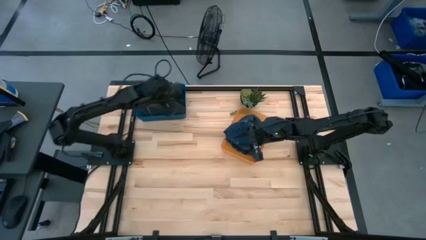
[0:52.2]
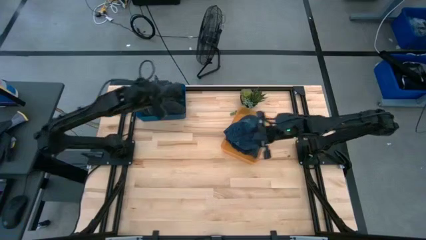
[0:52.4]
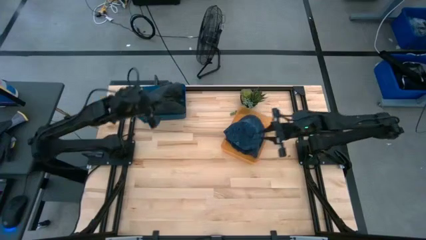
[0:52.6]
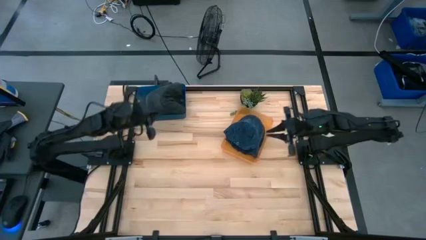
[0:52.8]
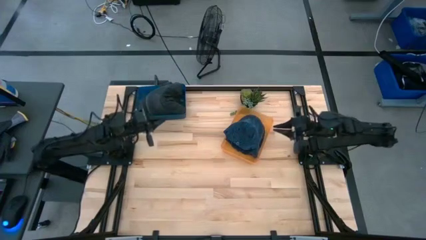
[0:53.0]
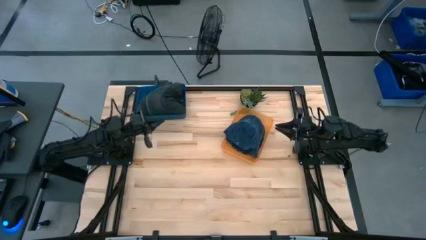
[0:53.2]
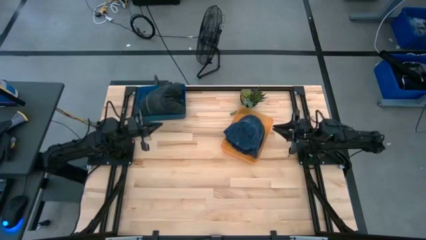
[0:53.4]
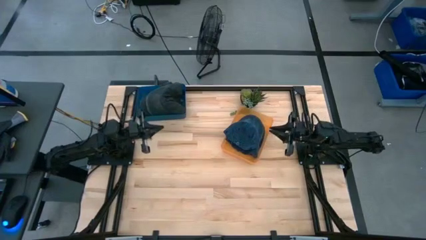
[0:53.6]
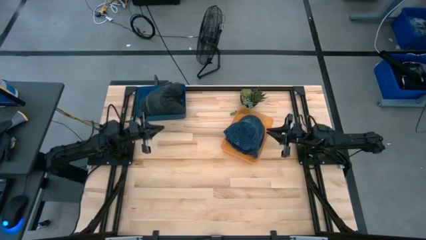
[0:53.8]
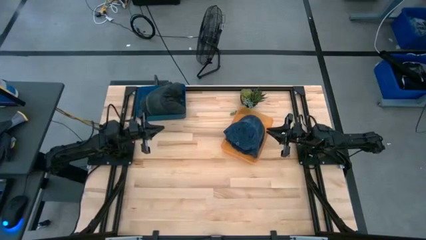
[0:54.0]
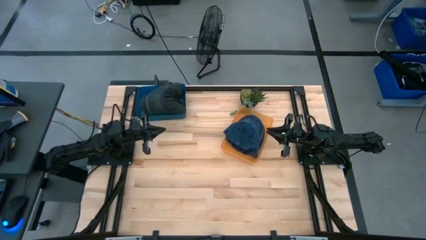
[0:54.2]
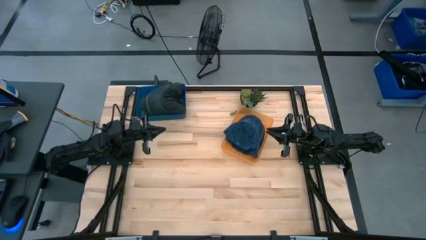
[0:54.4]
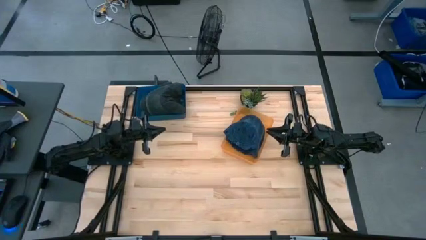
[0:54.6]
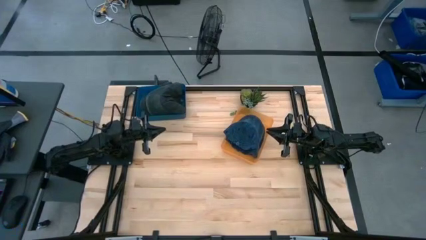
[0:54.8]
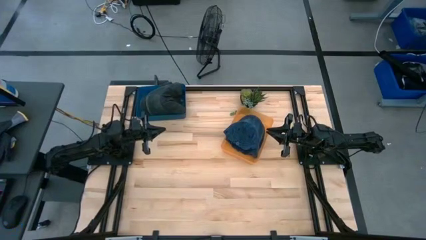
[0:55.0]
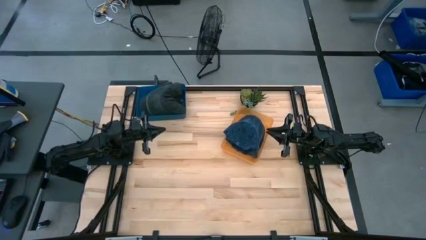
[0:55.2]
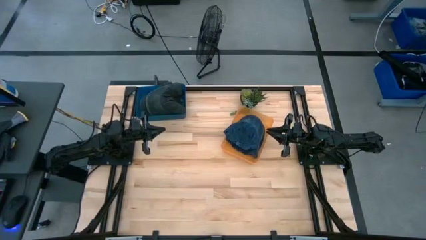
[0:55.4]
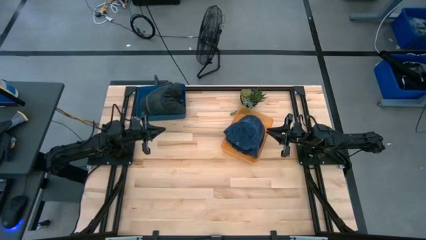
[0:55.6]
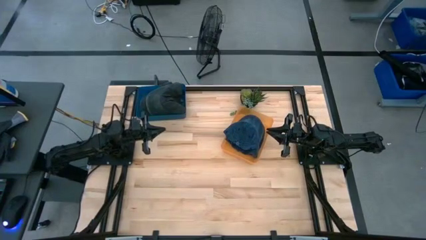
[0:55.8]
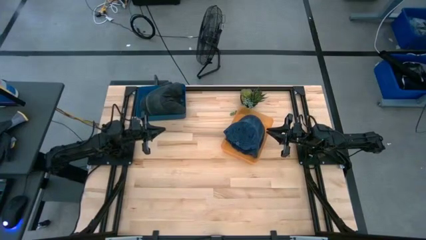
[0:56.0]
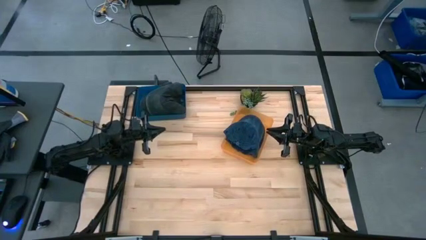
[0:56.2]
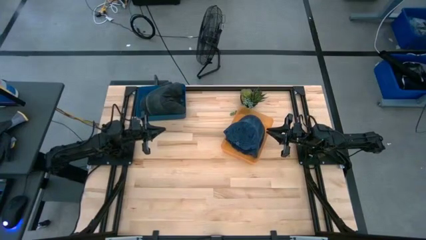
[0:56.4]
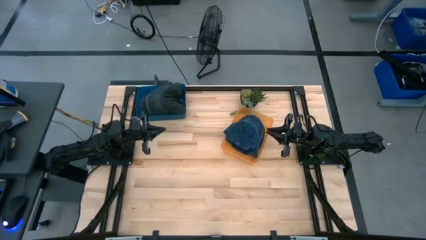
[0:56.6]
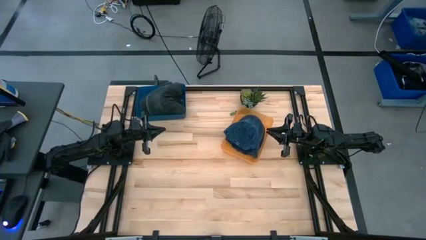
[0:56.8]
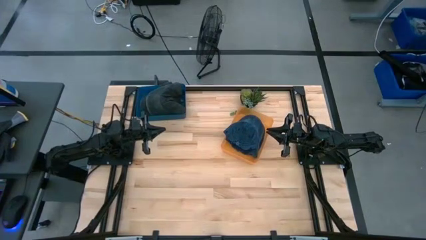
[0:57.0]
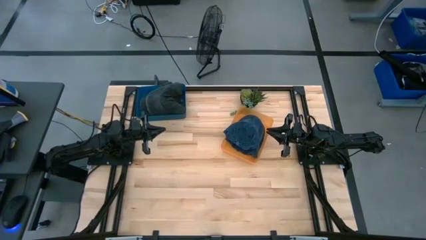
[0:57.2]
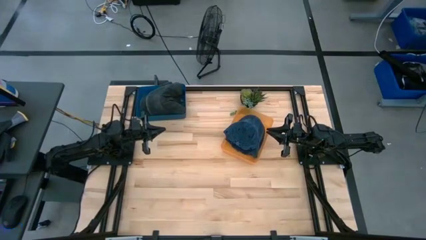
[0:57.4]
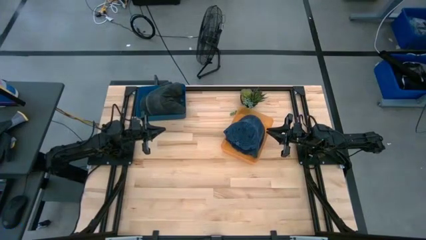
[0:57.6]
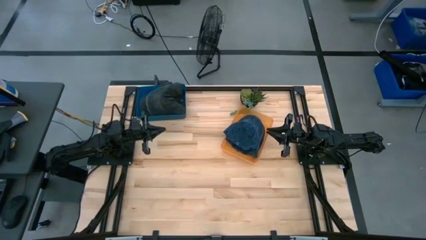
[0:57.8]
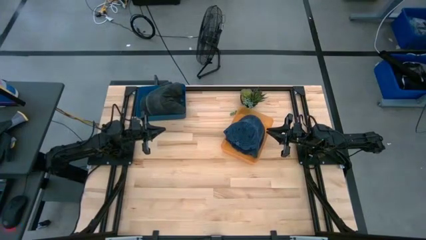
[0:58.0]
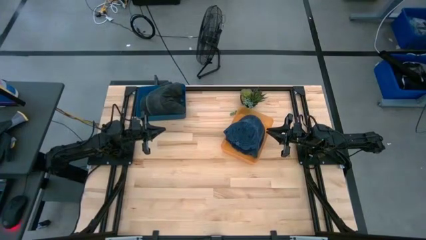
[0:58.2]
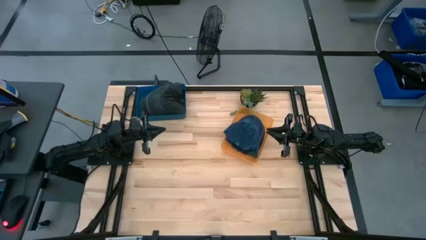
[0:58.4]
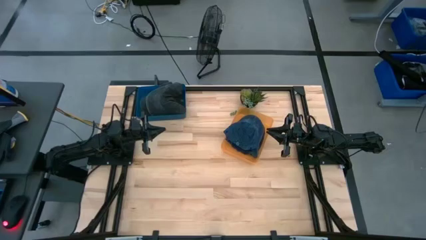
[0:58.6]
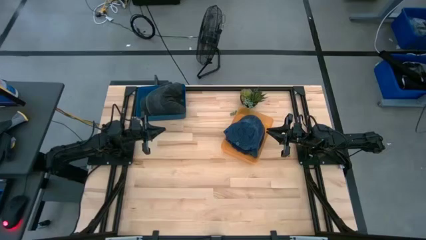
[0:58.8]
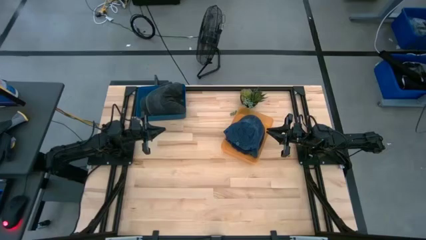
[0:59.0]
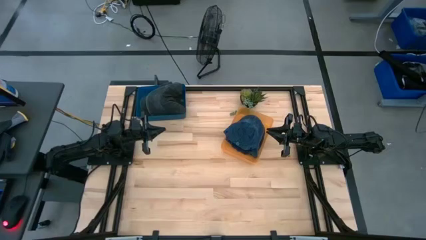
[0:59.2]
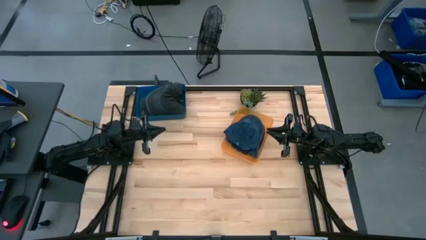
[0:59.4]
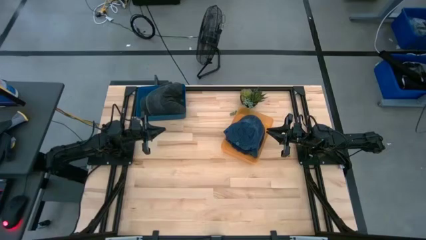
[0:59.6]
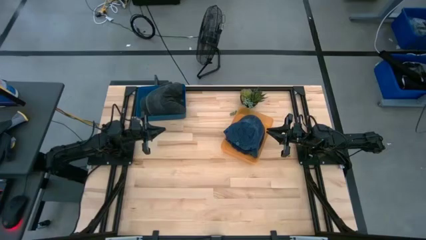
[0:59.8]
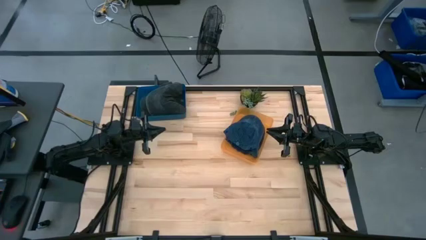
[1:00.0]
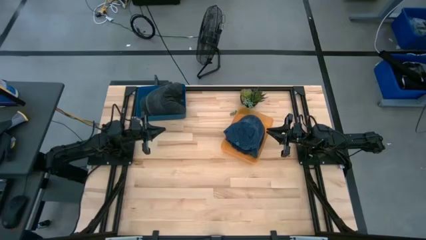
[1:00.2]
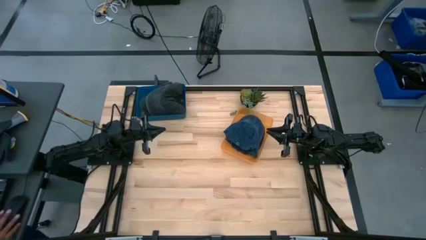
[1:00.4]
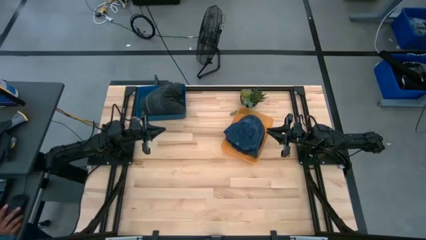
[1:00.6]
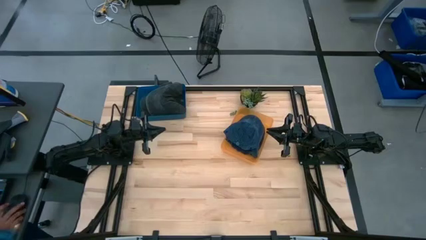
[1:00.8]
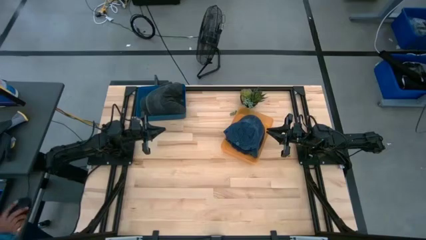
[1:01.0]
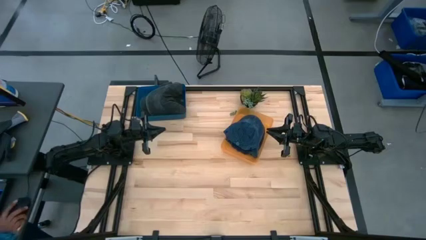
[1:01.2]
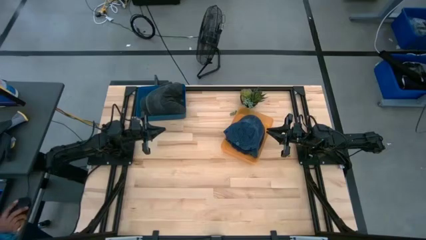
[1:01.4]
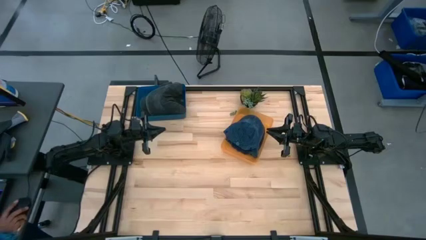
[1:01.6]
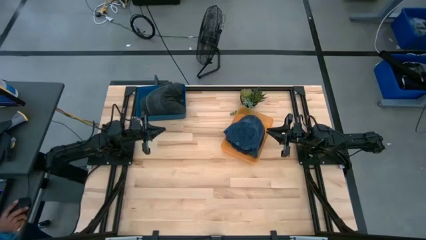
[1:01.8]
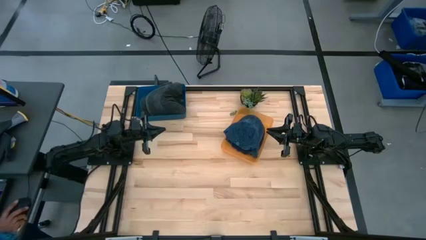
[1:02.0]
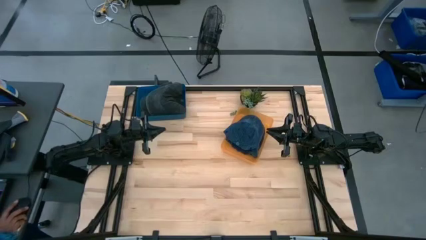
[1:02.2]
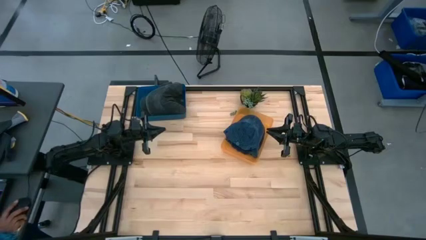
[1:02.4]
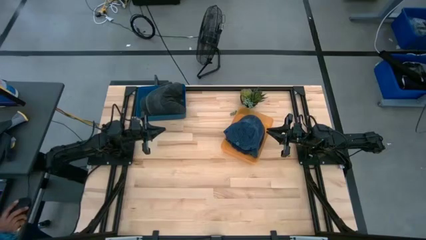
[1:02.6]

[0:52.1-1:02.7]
Task: Pick & Place hat
Return to Home Position
